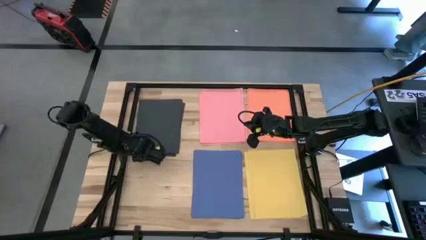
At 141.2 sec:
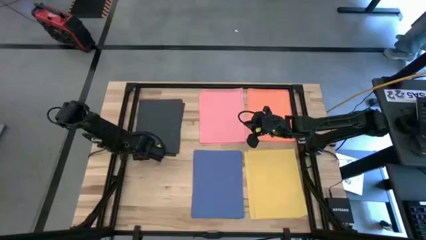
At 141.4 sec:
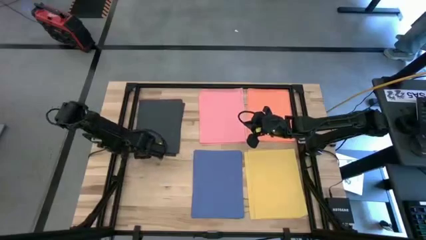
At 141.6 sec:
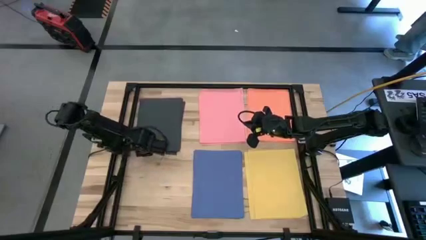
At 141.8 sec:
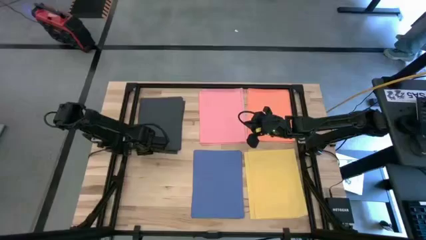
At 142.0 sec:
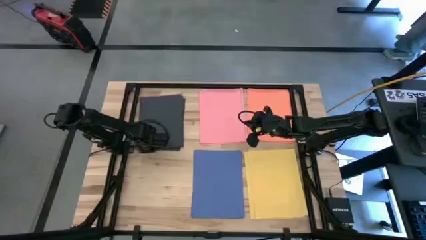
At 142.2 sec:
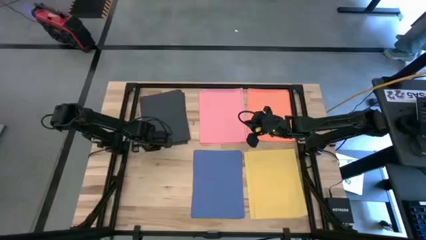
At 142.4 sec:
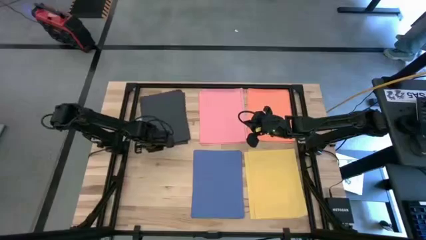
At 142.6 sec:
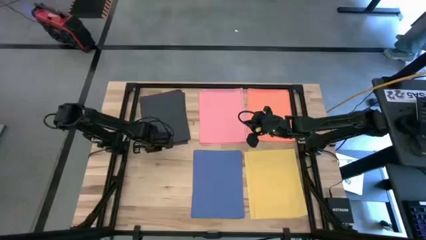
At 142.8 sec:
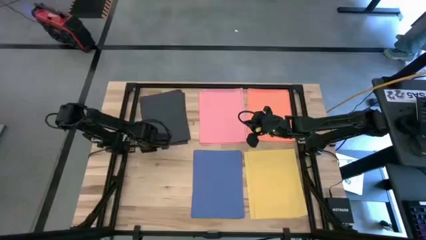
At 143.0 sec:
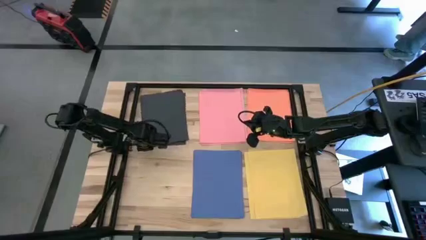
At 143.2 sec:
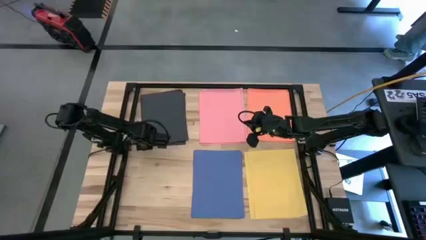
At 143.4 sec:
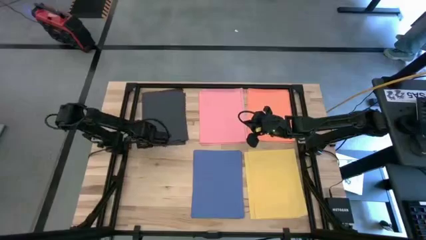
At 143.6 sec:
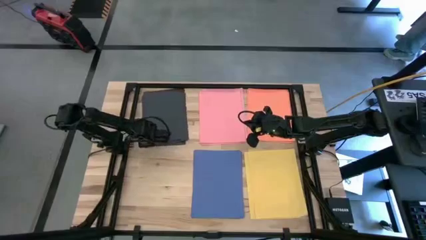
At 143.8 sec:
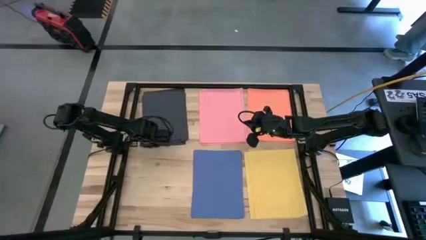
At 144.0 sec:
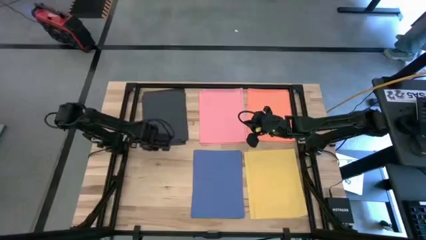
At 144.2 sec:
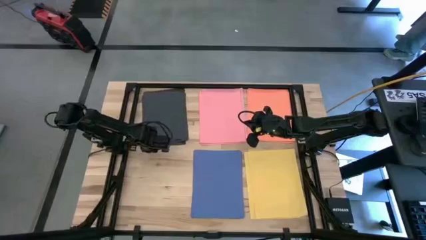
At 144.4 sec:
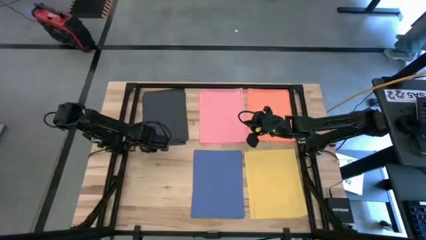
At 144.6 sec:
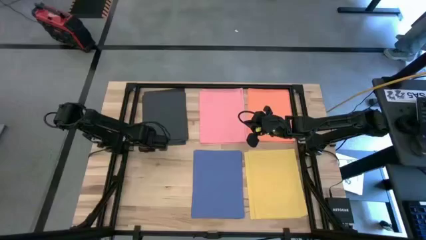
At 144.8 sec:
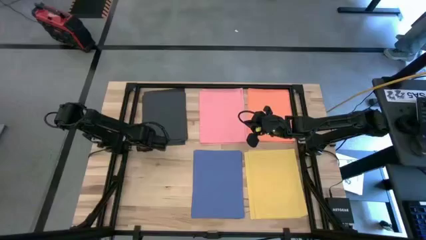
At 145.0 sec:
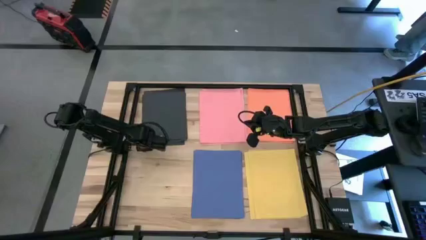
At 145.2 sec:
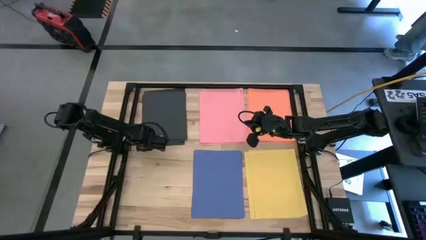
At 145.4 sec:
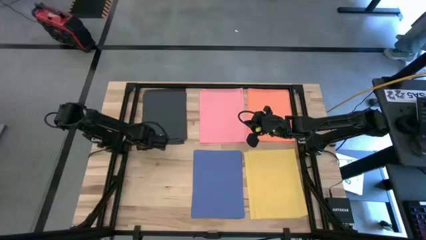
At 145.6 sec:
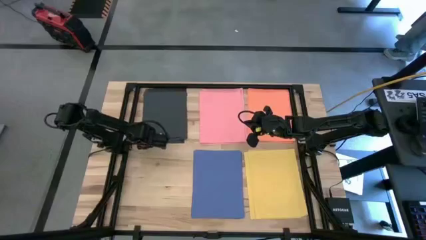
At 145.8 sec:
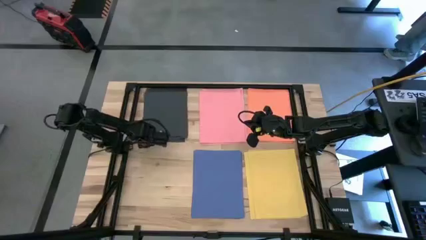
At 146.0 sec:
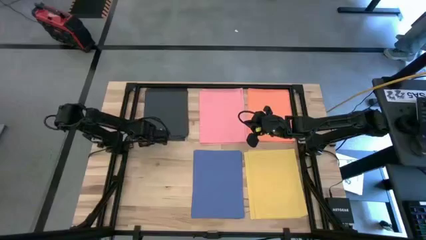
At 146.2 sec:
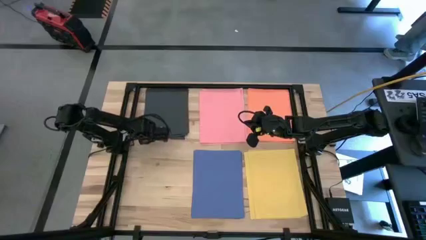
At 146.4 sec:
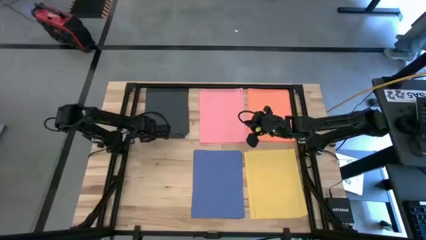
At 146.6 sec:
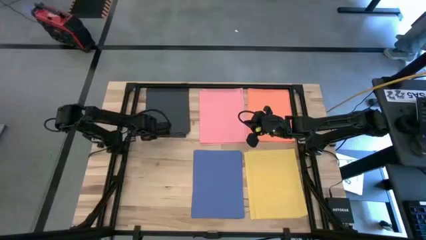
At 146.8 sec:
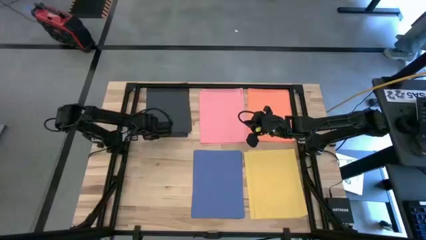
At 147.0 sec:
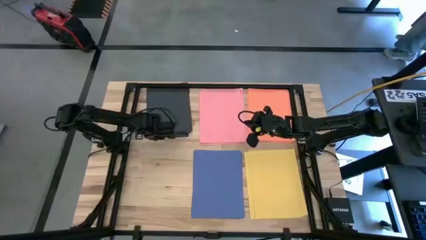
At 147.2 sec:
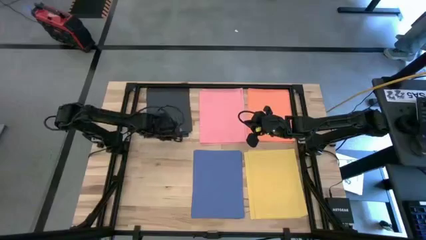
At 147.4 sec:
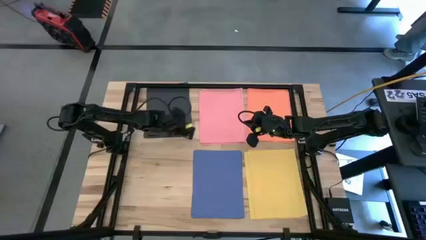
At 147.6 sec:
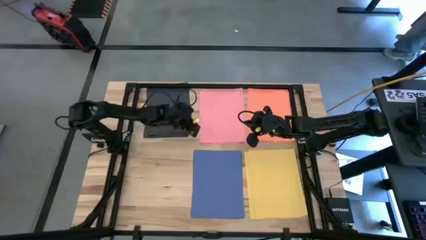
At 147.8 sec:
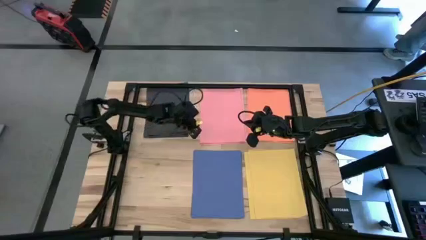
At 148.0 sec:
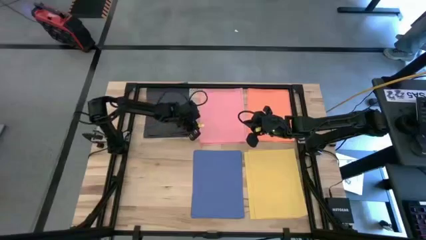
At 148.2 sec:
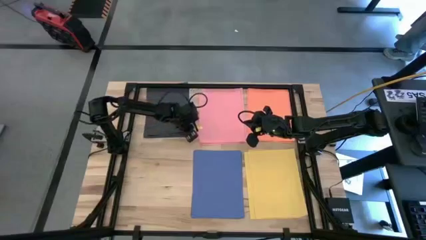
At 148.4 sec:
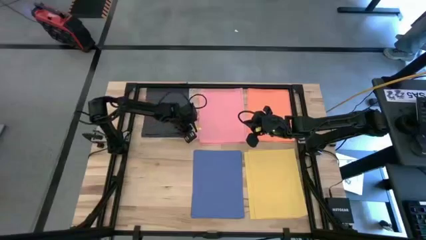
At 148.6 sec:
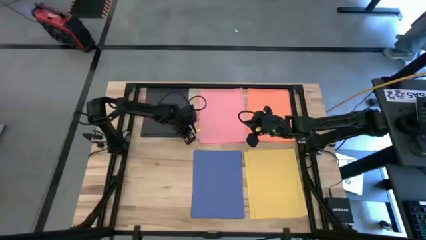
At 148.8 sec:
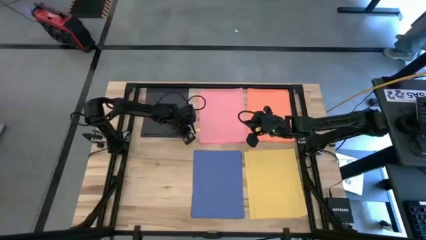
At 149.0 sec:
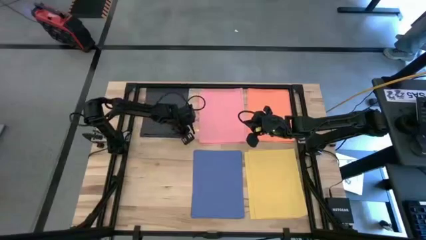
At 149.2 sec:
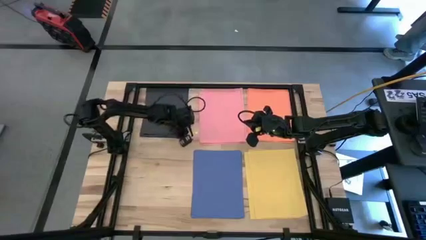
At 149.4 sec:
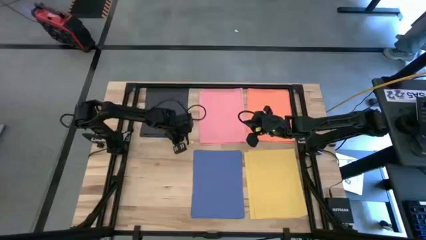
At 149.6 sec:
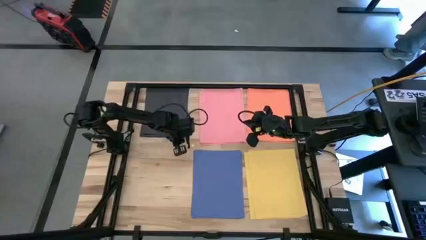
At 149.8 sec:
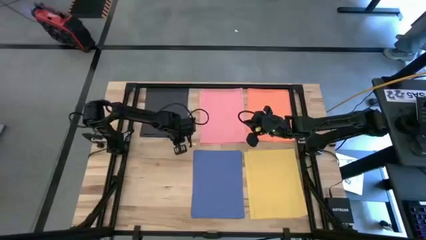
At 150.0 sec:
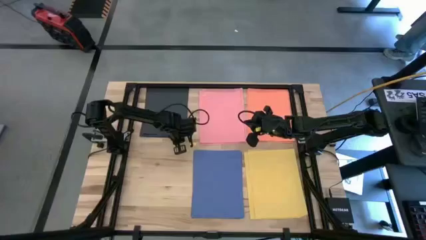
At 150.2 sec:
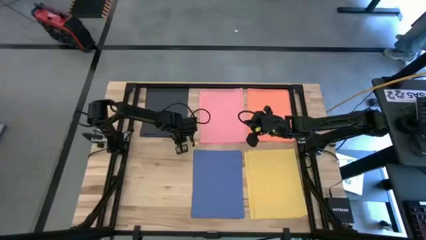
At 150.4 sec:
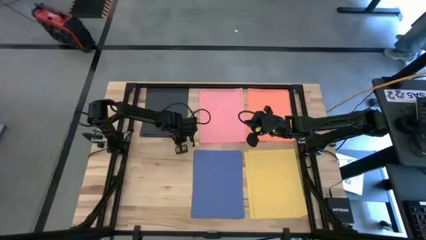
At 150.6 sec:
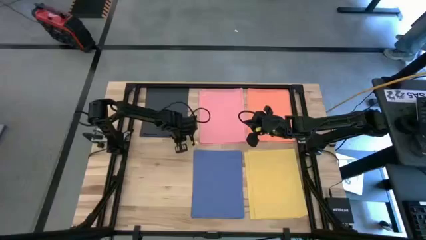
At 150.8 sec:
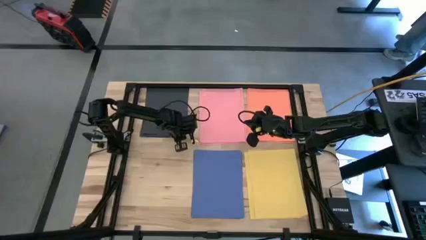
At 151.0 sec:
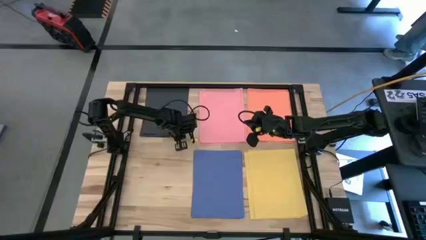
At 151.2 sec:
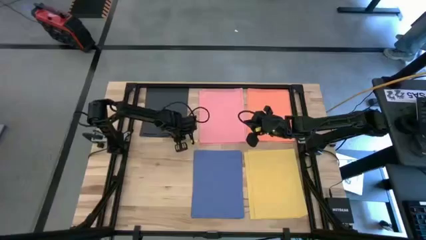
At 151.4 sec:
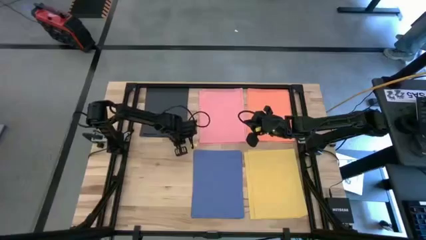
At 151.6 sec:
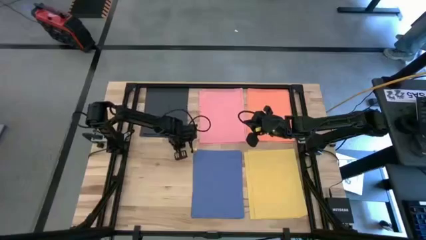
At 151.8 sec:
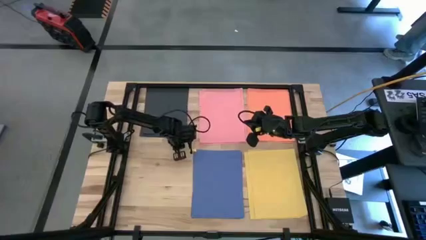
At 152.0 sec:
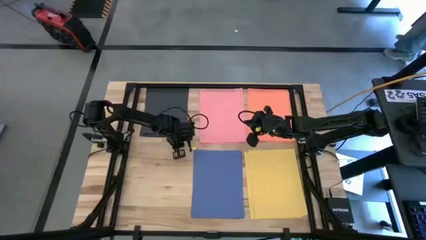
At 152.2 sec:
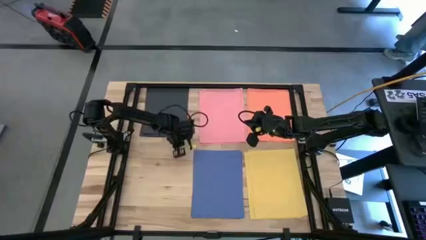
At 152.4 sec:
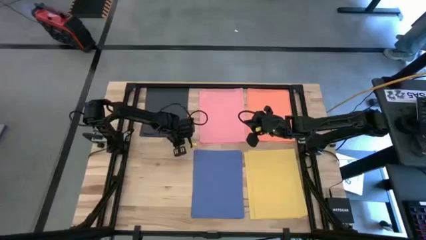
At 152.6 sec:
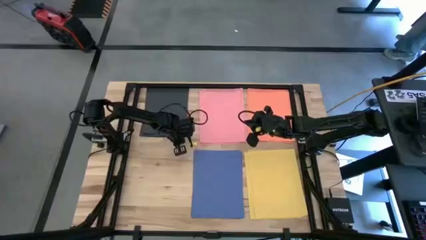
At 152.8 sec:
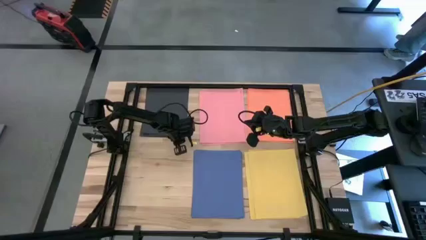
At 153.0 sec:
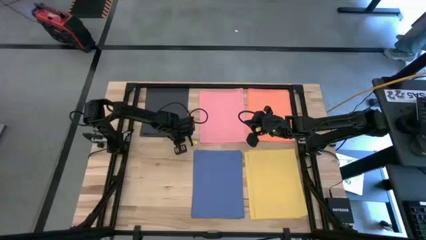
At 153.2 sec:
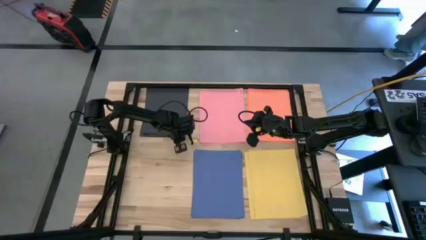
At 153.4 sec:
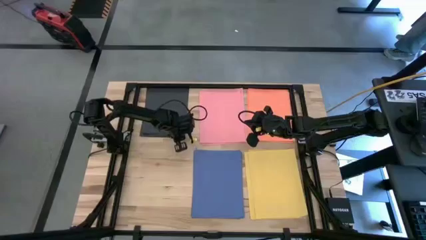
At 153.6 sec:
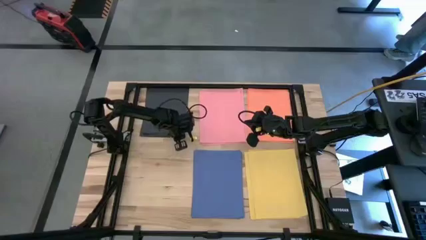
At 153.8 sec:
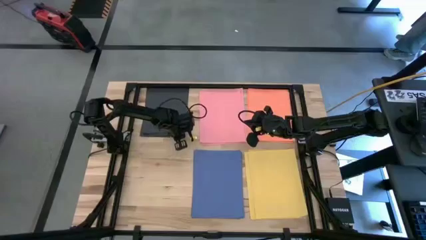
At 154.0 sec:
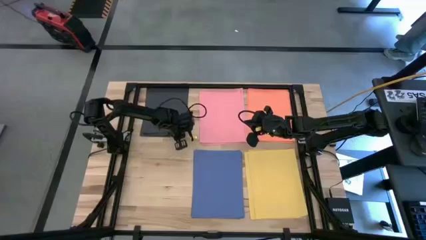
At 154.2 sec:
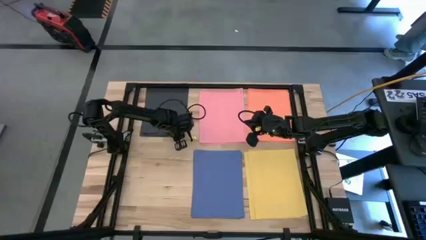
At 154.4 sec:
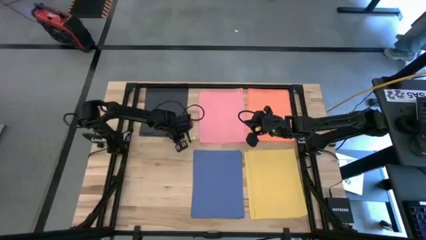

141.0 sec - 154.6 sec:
Task: Organize paper
Move all of the black paper at the upper left of the table

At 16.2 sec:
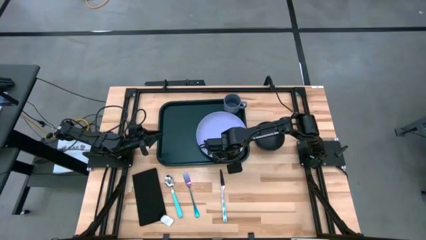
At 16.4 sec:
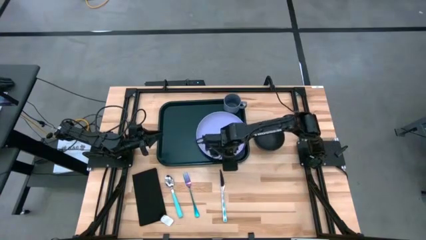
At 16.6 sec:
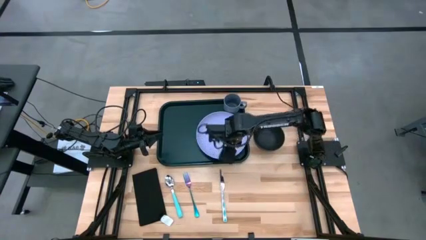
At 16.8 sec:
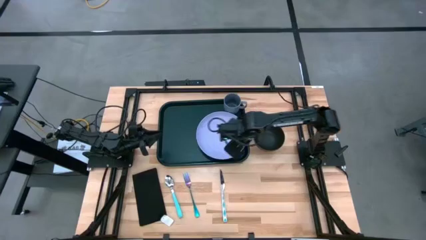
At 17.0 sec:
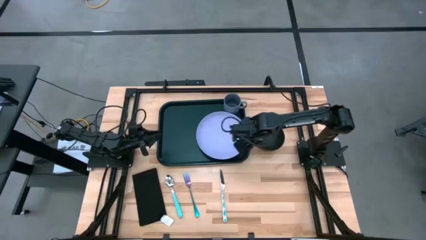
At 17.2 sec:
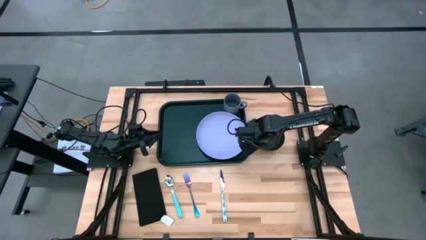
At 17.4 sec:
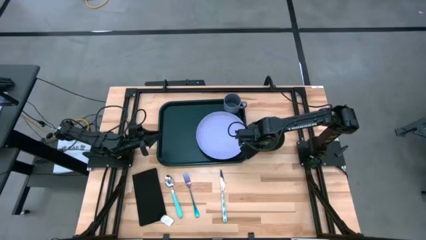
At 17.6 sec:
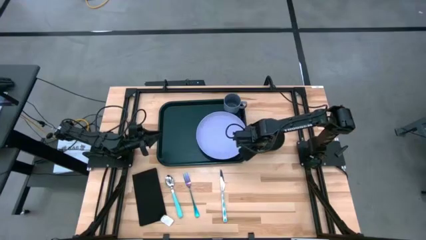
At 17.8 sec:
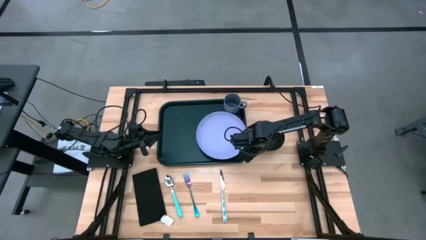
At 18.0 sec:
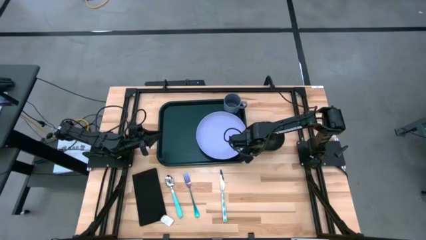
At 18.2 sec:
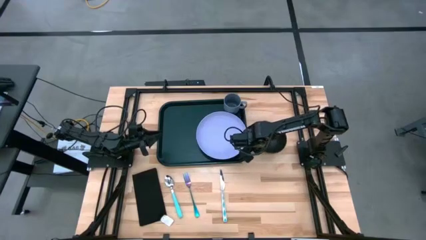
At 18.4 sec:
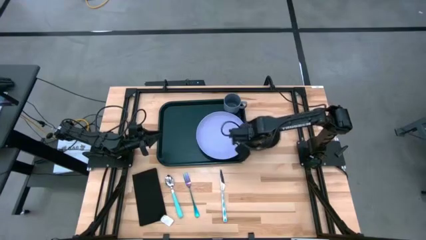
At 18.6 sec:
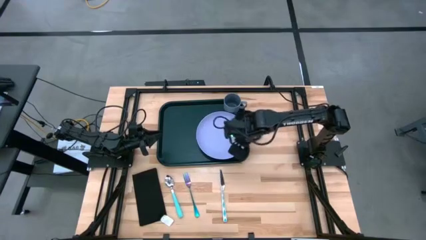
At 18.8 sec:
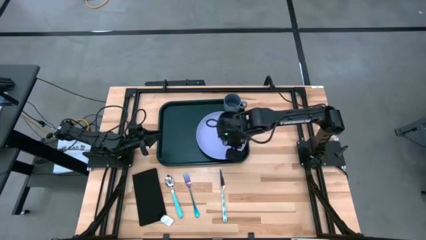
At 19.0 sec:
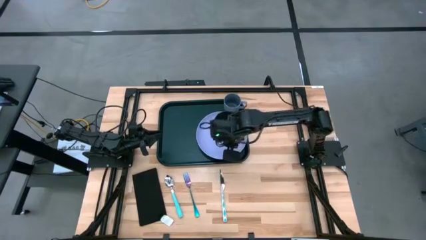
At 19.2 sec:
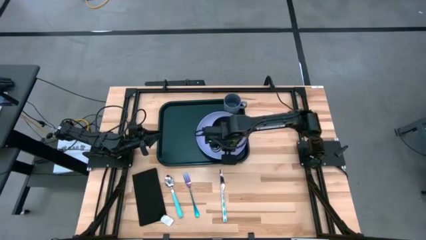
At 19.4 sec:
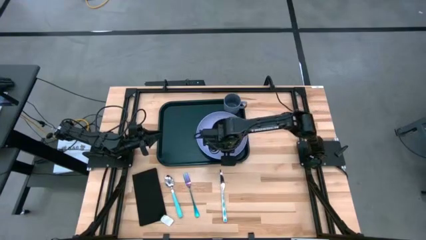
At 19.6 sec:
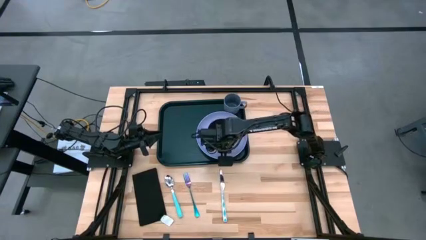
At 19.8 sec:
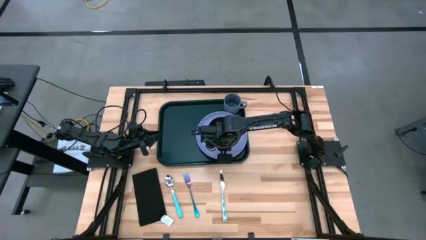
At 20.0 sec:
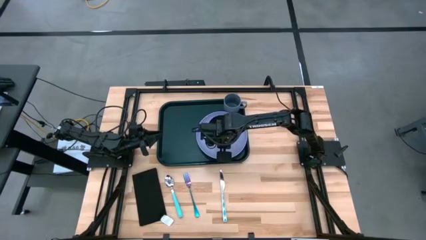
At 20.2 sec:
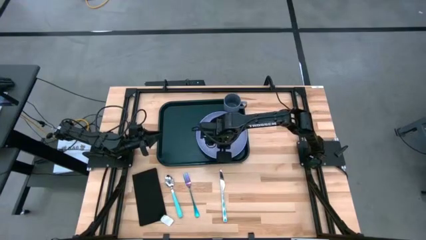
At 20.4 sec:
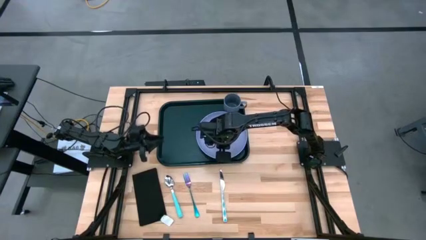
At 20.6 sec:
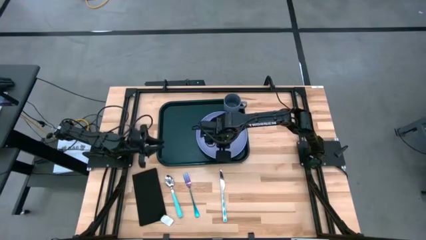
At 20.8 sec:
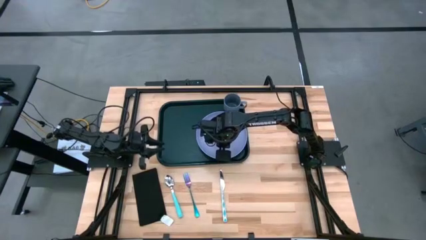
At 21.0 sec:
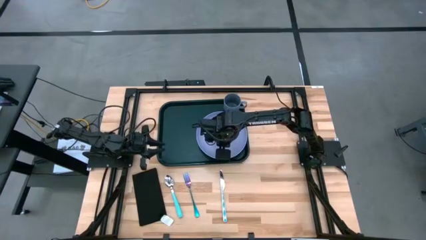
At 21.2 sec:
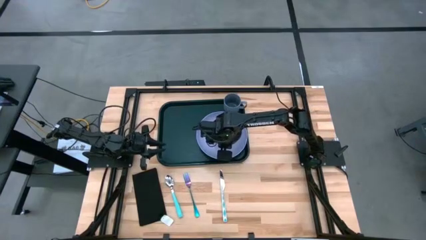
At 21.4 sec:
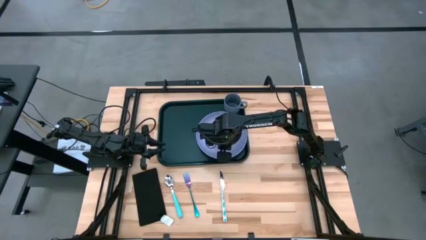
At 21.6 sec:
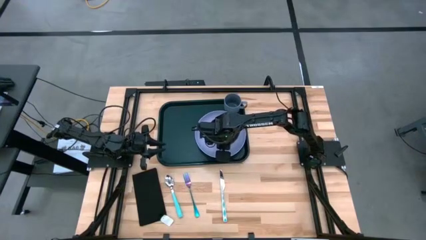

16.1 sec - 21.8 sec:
Task: Set up tray
Put the black bowl on the purple plate
